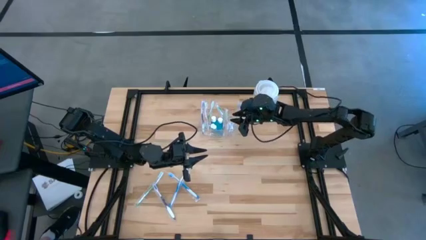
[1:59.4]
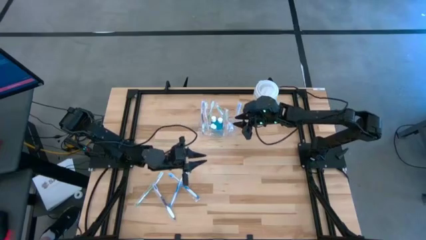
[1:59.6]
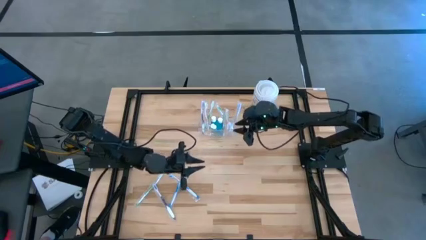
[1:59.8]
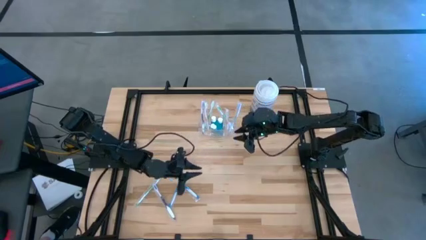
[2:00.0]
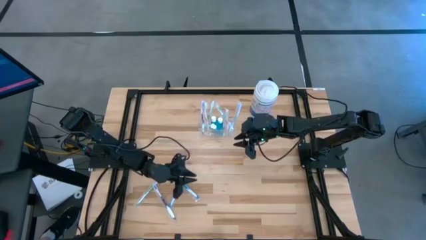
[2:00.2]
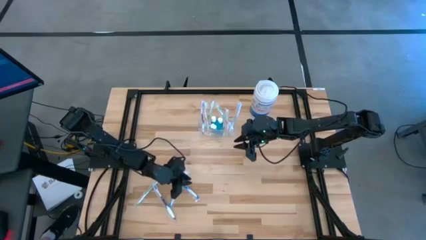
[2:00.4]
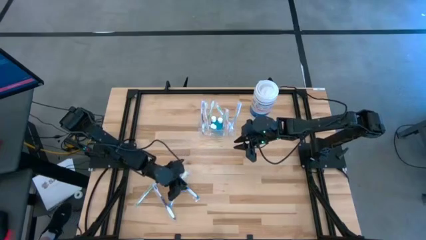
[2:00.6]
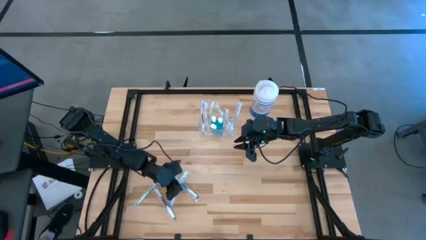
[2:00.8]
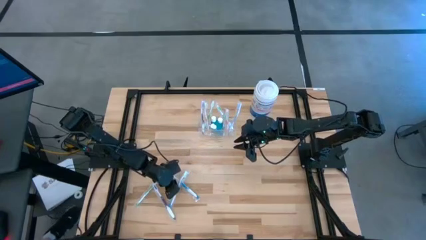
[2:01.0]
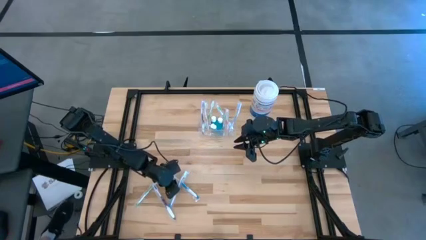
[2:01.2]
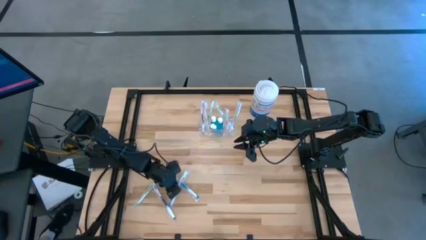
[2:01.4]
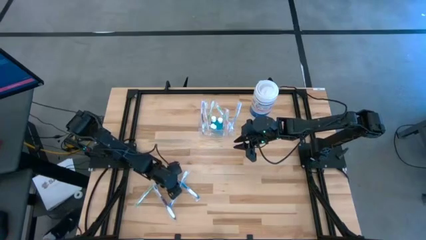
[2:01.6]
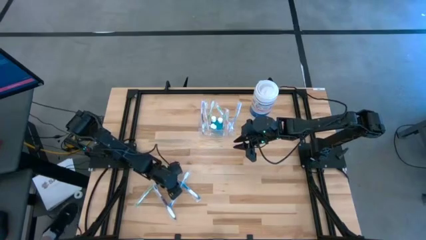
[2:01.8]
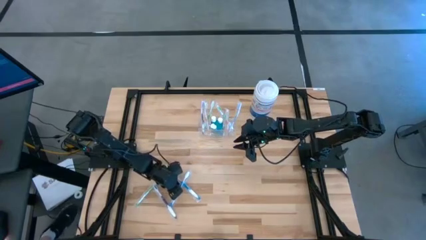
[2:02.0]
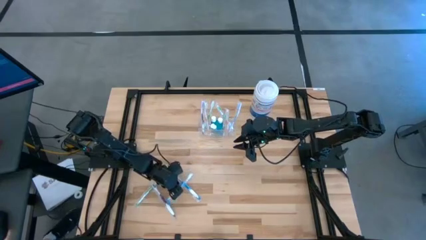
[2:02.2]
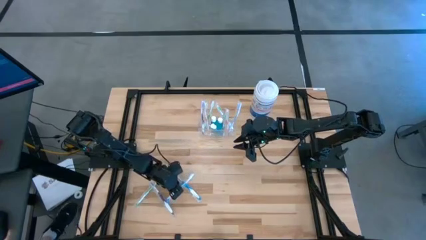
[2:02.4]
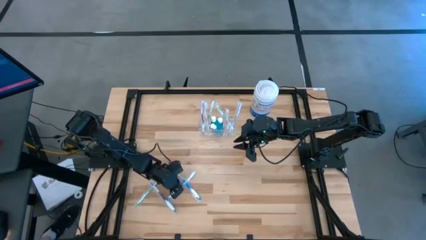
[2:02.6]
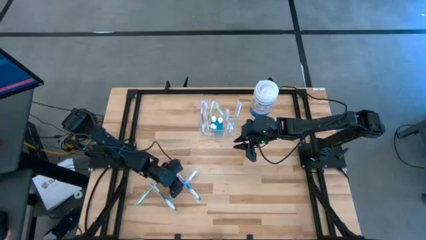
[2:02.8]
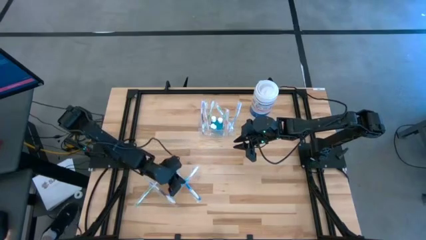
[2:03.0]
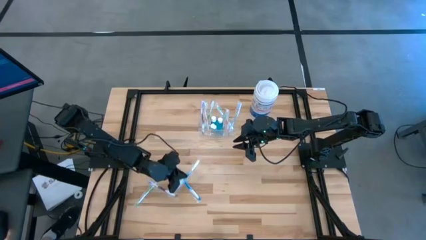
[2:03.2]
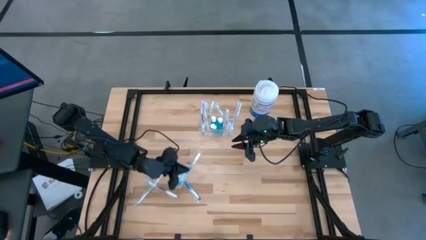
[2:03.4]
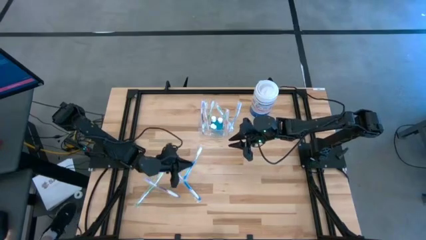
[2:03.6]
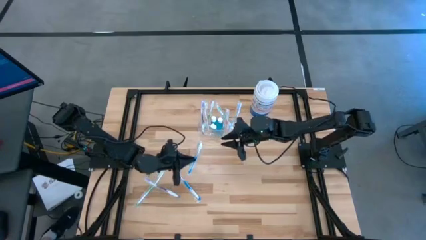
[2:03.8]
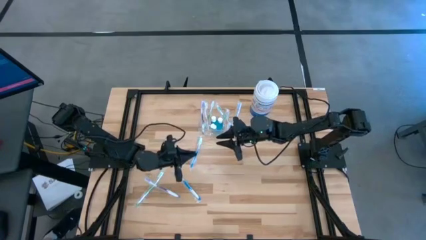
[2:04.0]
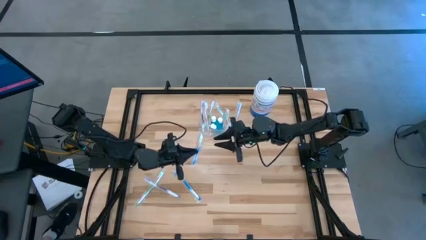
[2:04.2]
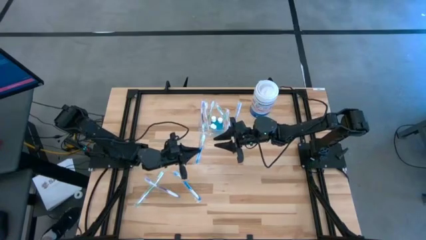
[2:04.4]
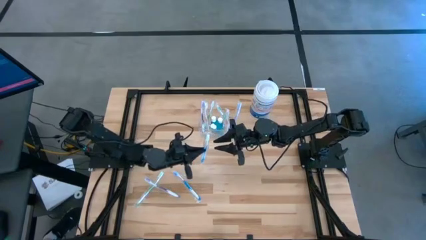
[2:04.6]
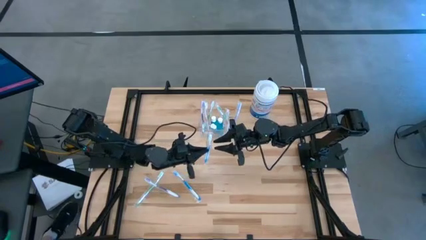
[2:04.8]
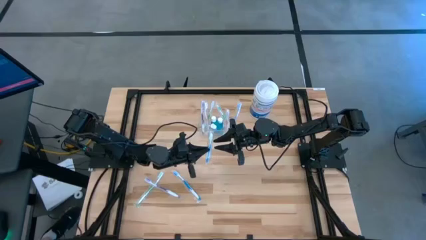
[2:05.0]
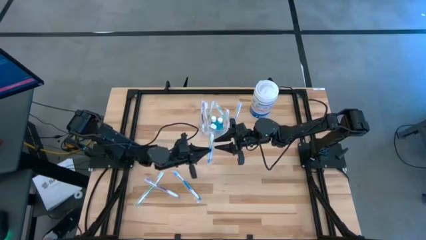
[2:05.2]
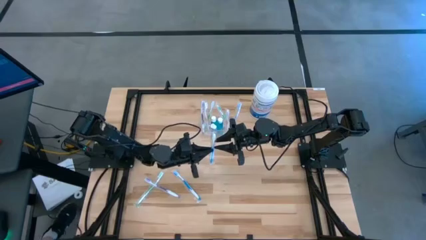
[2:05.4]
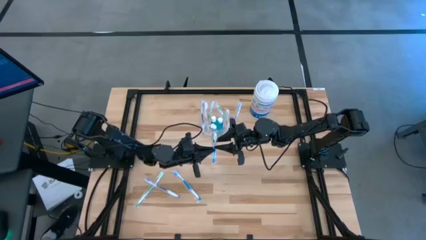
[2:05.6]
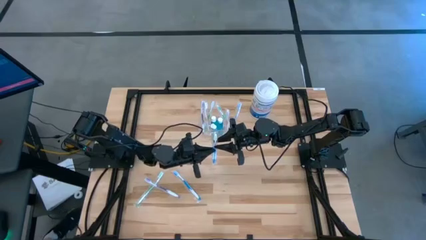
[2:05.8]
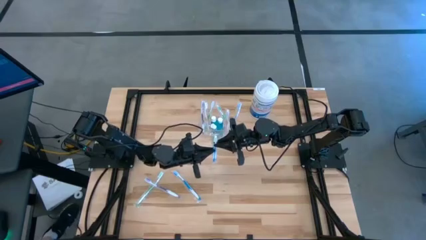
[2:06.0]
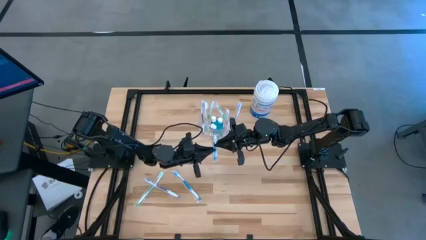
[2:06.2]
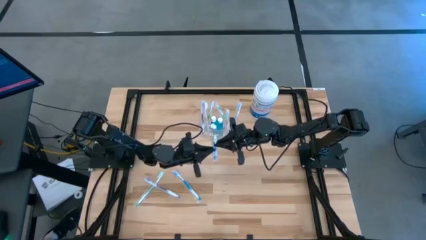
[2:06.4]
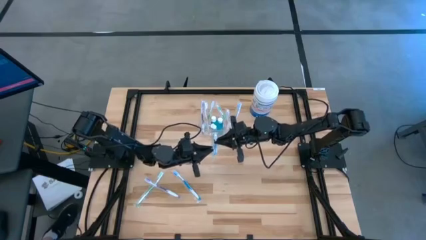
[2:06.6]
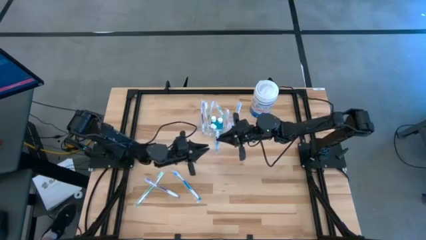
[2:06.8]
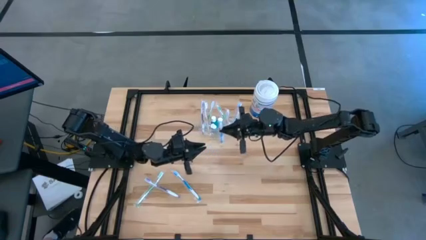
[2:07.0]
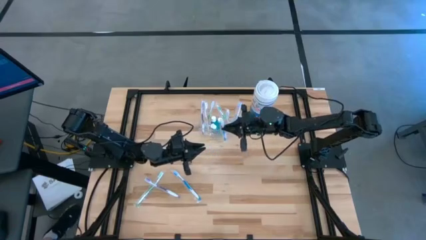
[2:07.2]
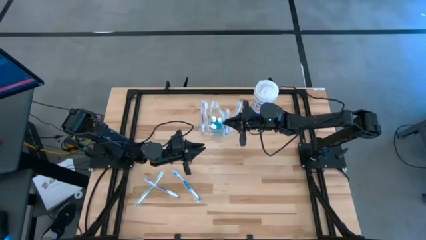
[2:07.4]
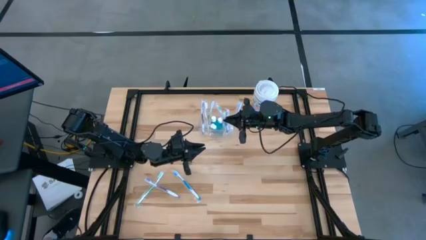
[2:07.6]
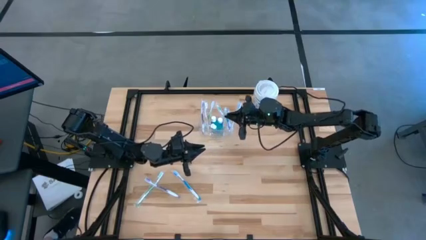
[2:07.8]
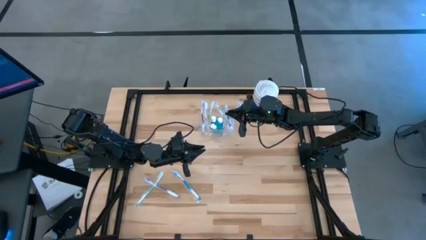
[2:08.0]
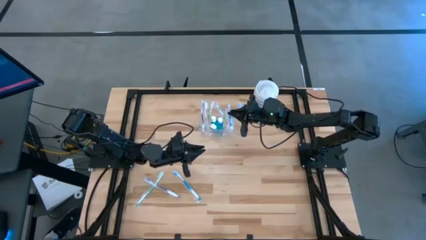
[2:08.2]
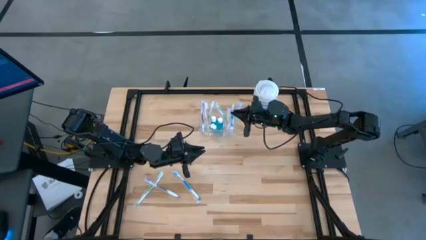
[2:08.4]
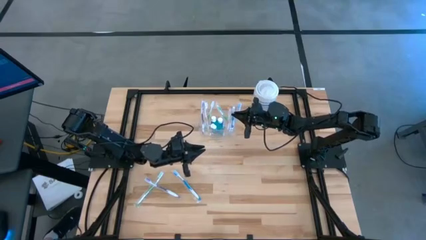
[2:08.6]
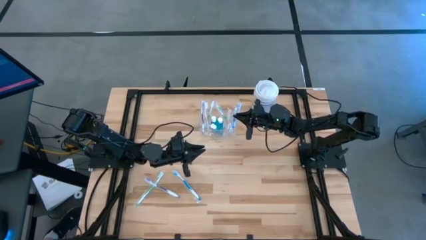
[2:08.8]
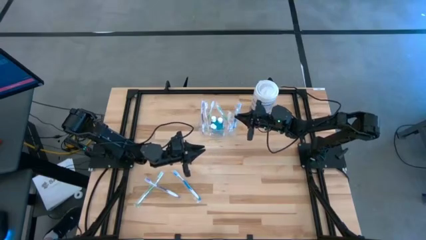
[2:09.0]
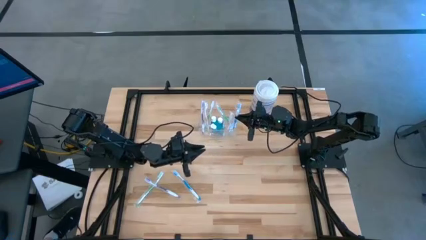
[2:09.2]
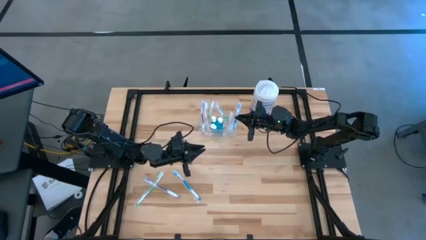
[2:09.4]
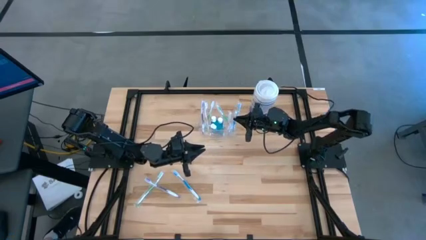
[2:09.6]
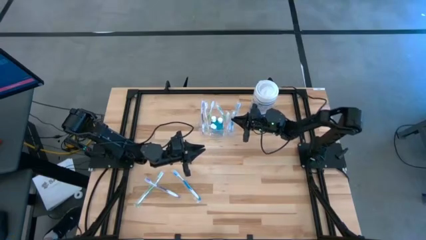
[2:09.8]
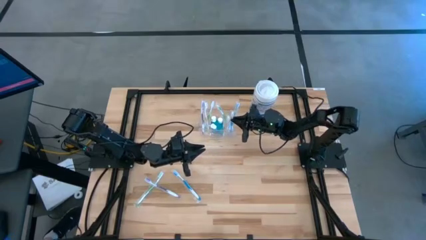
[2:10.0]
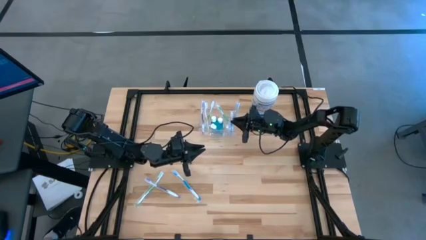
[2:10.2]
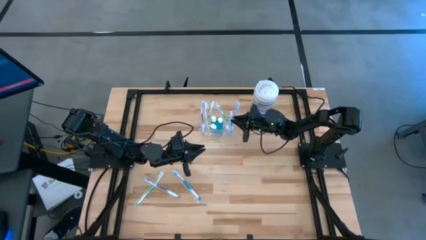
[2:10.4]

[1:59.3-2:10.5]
Task: Pick & Place toothbrushing station
Put the top blue toothbrush into the transparent organizer

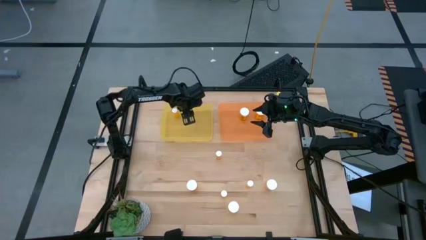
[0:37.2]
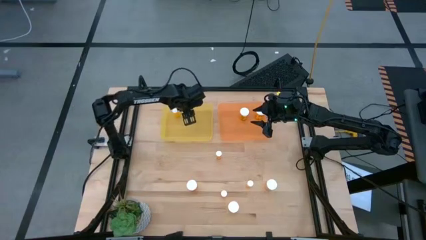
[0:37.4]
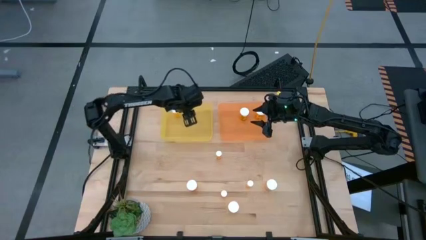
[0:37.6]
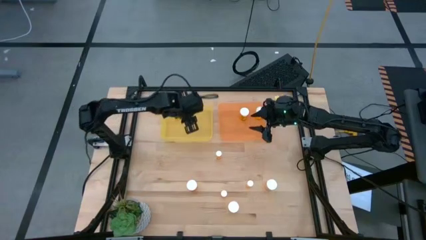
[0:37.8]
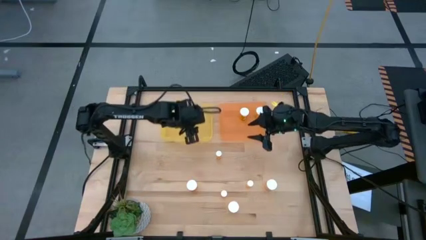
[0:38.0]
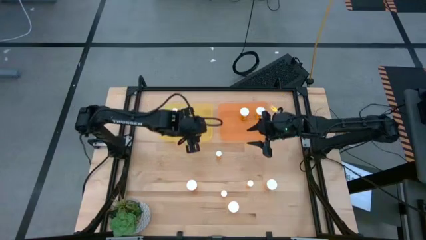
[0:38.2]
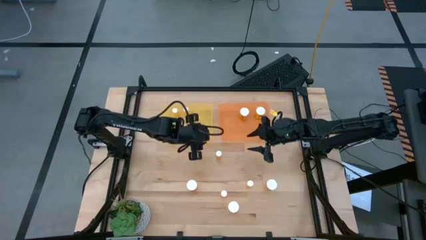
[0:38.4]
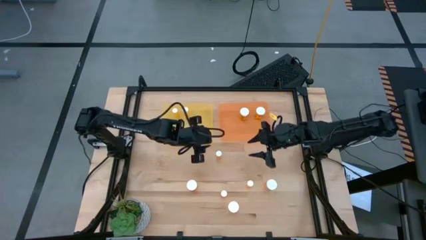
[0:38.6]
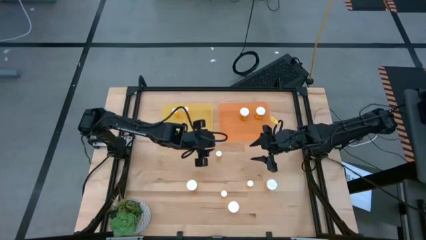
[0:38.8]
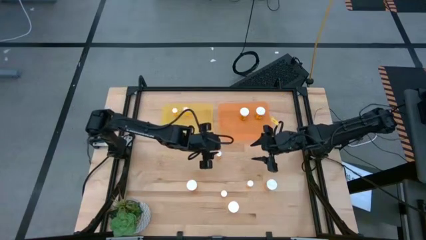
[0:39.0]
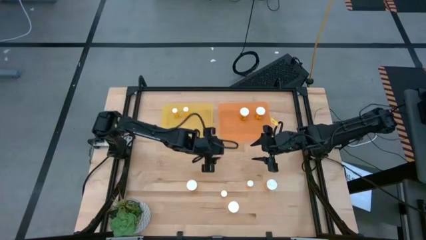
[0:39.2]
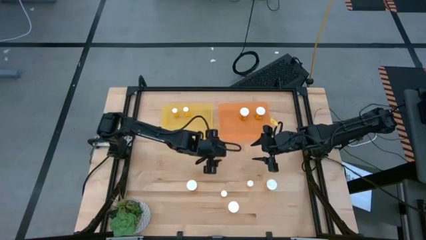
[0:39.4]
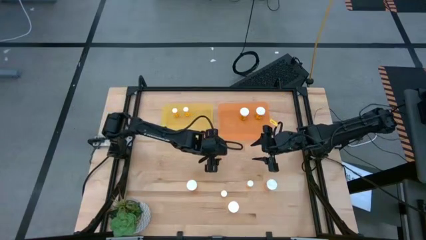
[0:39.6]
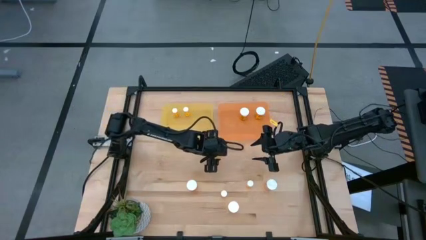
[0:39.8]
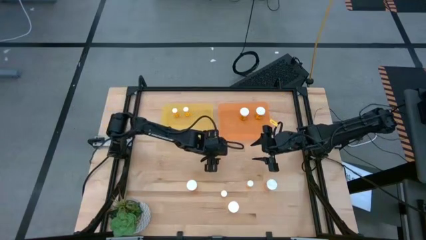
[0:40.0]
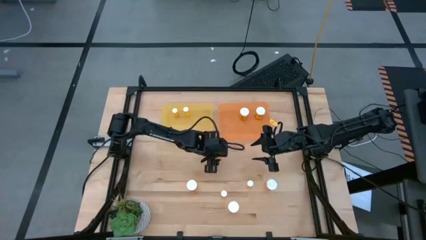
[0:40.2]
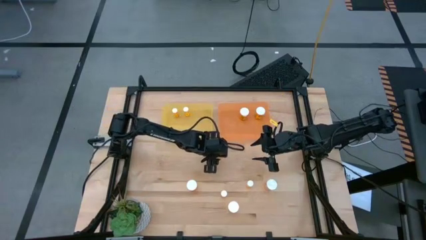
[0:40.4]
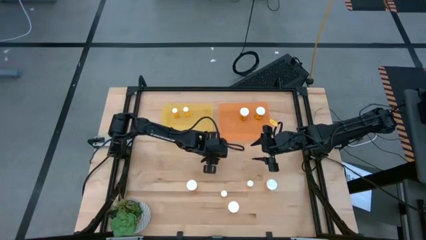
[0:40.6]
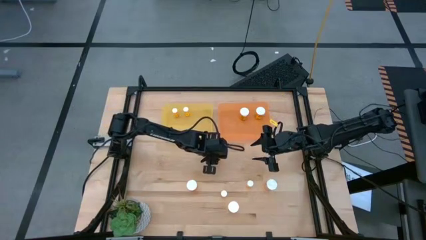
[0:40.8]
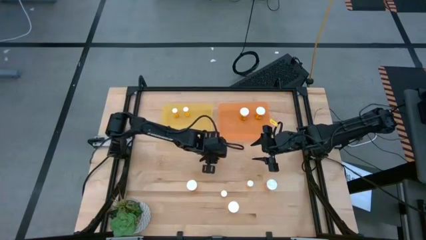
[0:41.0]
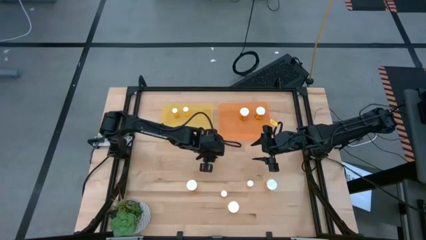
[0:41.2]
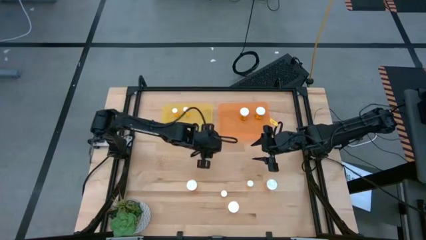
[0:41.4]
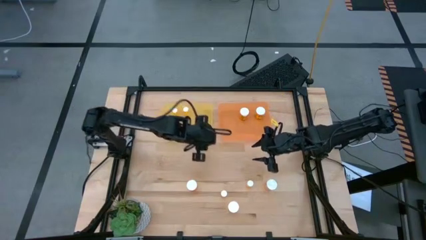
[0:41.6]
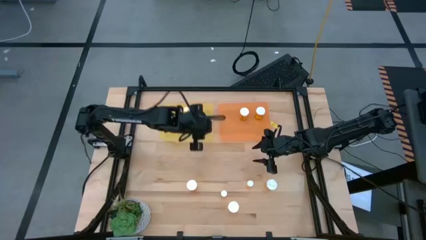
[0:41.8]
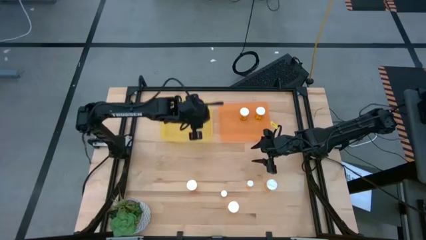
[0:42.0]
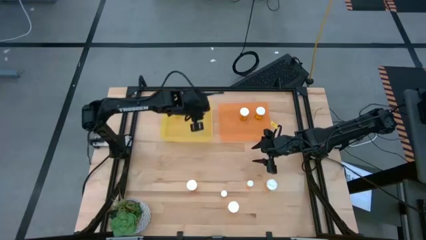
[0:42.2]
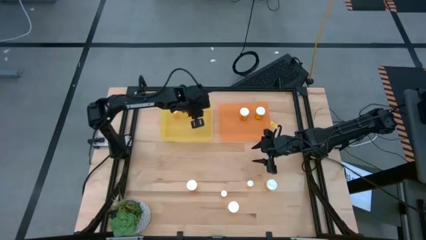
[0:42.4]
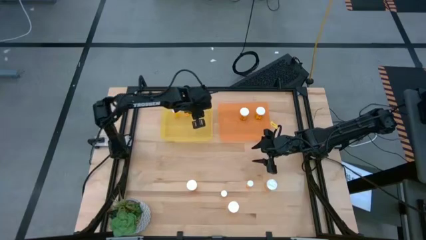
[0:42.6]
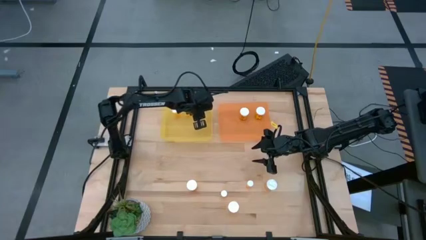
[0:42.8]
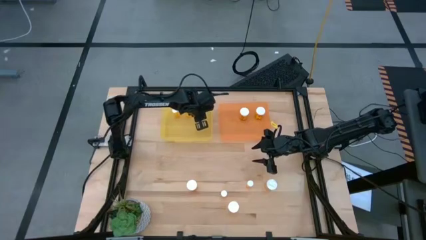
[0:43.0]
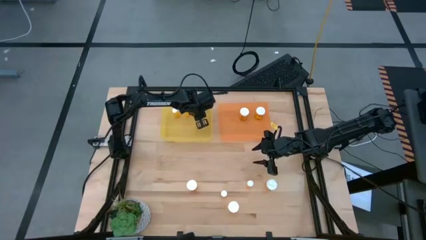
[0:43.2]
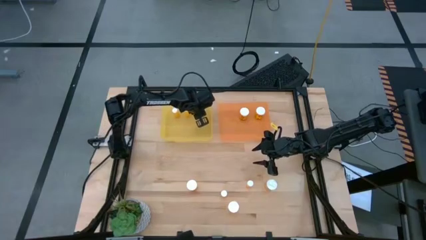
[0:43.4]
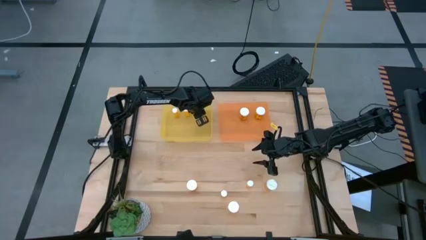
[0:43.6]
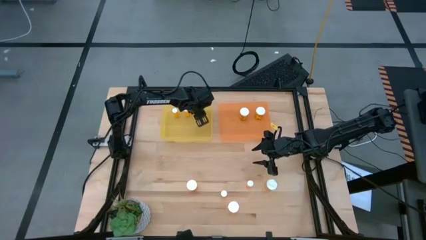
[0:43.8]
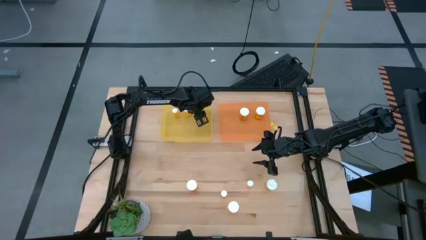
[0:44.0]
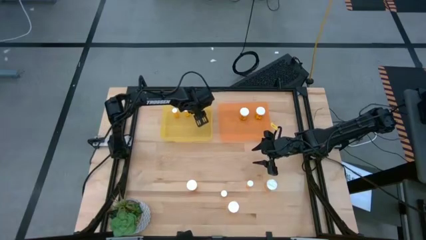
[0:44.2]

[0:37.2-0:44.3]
Task: Pick and place medicine bottles into bin by pill shape (circle, oval)
Put the small orange pill bottle into the yellow bin
